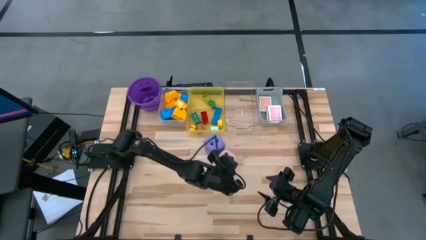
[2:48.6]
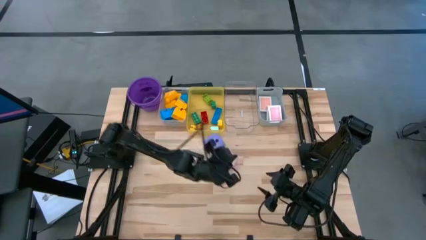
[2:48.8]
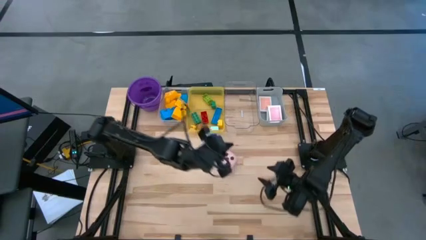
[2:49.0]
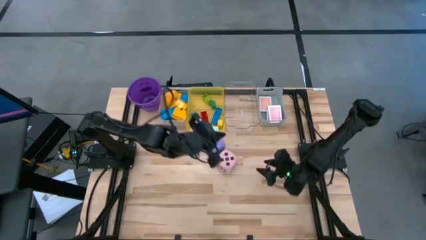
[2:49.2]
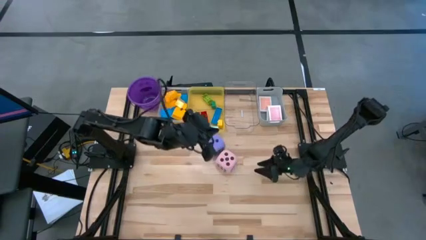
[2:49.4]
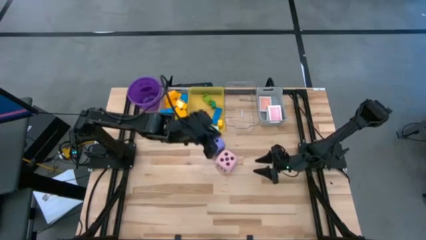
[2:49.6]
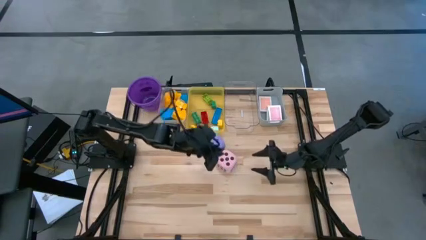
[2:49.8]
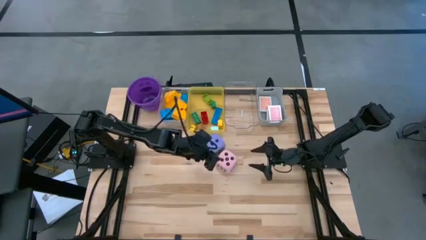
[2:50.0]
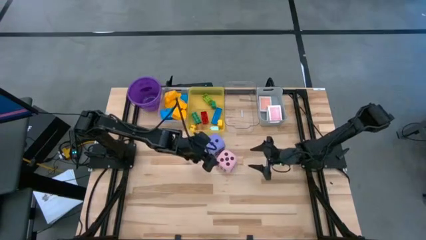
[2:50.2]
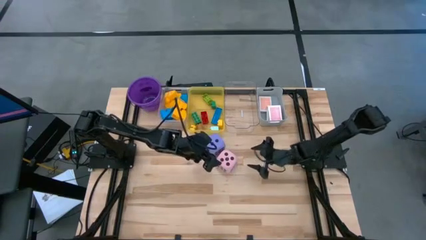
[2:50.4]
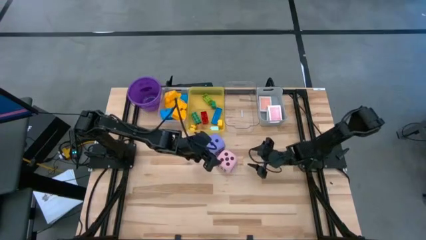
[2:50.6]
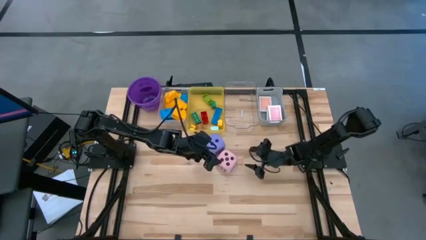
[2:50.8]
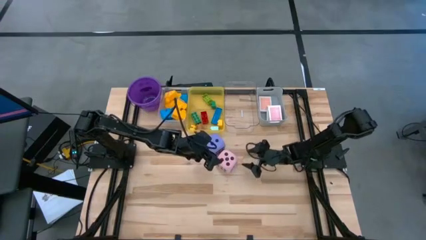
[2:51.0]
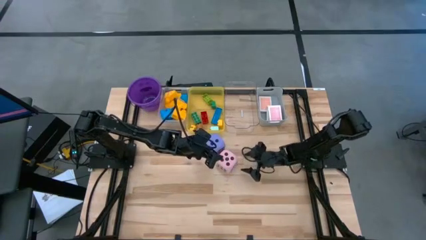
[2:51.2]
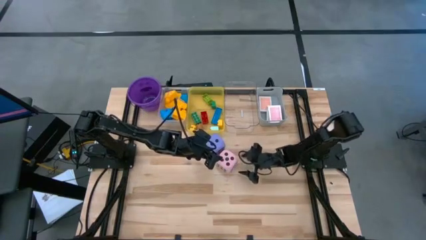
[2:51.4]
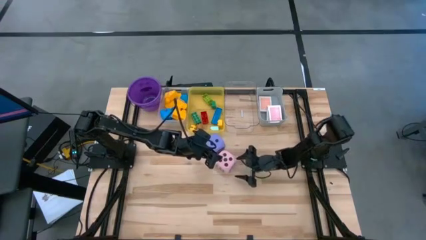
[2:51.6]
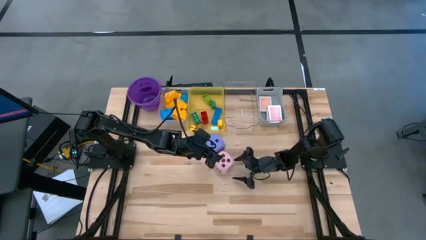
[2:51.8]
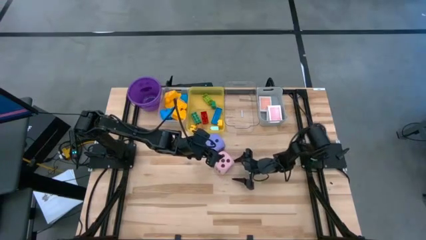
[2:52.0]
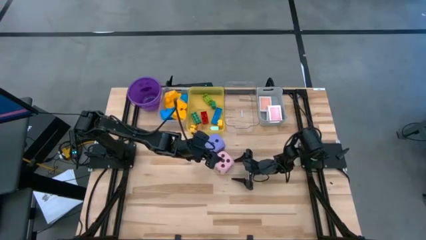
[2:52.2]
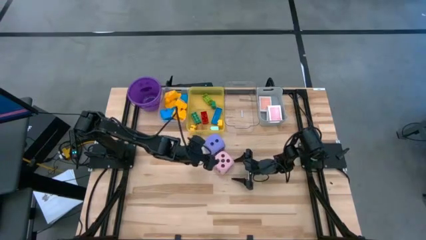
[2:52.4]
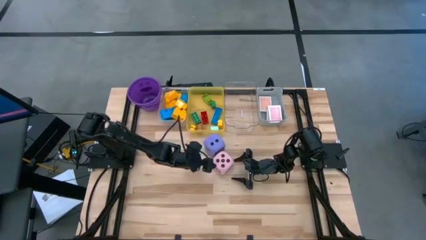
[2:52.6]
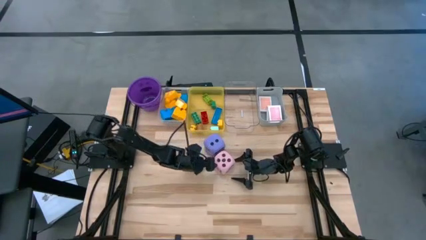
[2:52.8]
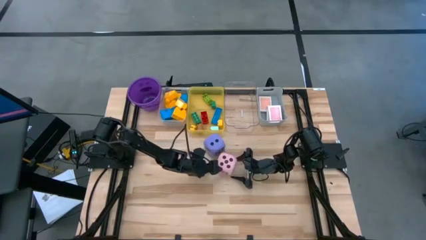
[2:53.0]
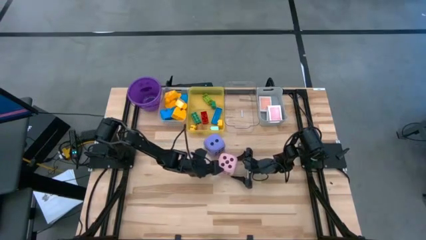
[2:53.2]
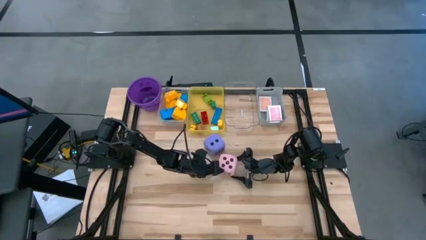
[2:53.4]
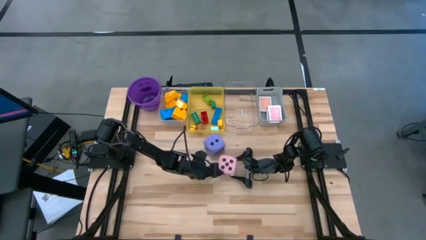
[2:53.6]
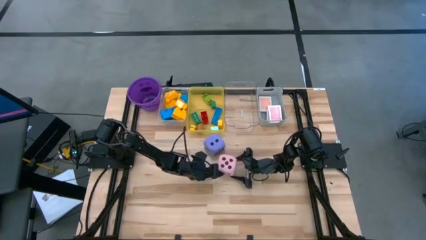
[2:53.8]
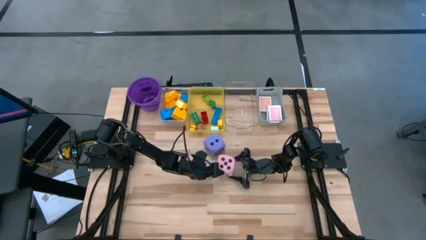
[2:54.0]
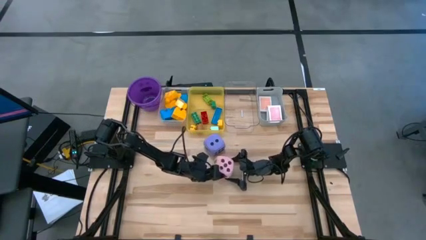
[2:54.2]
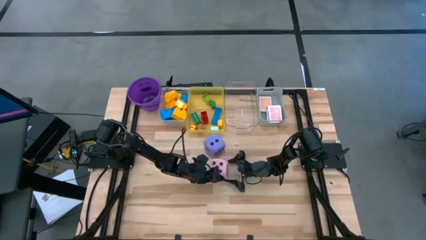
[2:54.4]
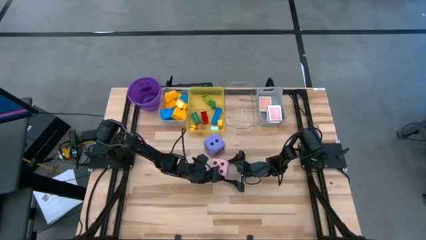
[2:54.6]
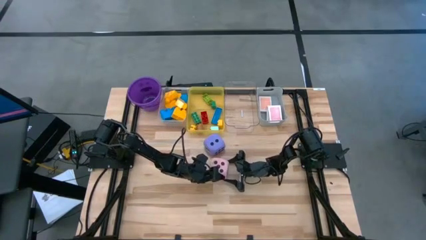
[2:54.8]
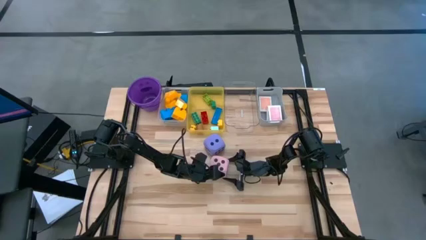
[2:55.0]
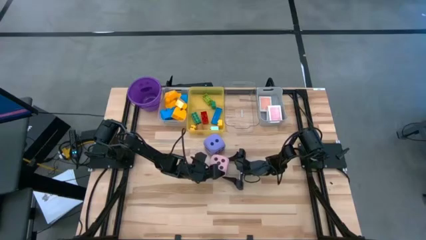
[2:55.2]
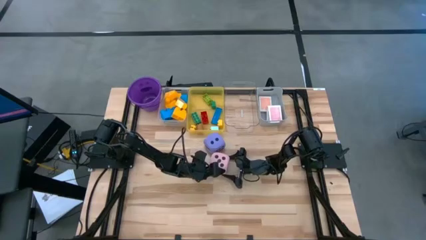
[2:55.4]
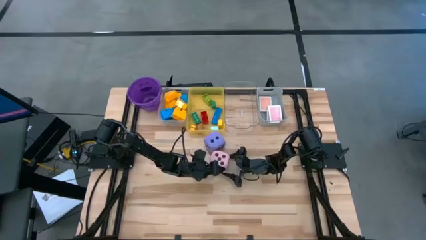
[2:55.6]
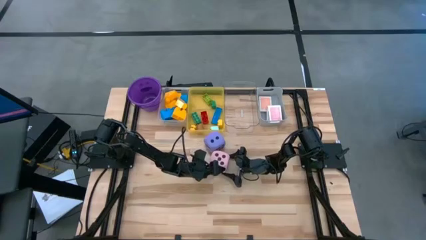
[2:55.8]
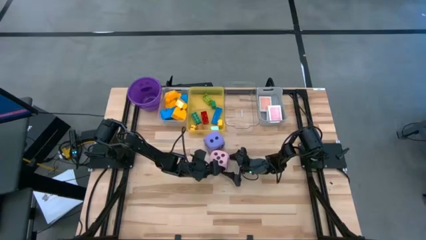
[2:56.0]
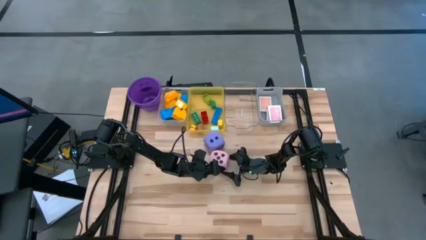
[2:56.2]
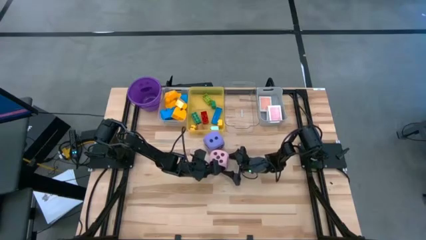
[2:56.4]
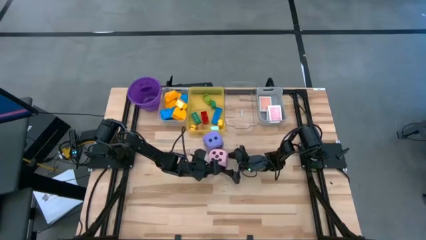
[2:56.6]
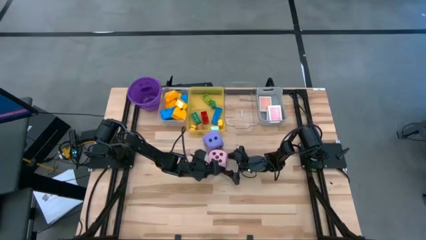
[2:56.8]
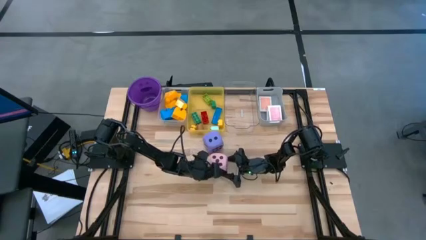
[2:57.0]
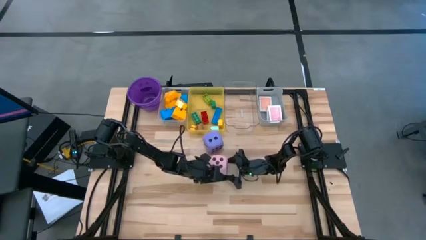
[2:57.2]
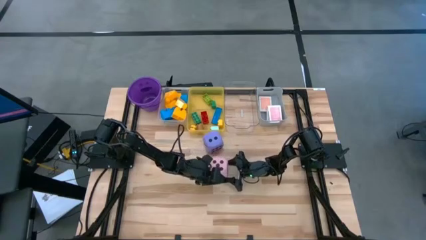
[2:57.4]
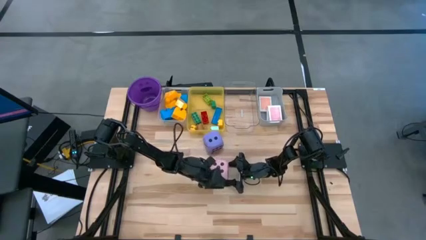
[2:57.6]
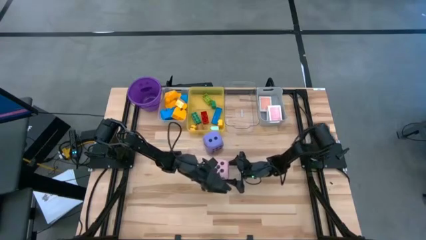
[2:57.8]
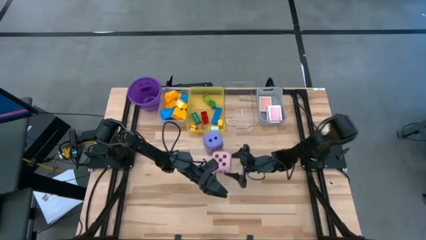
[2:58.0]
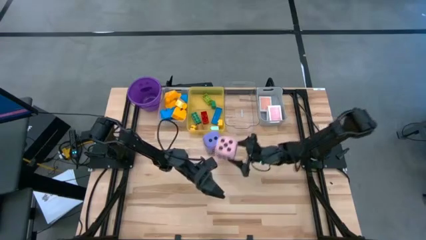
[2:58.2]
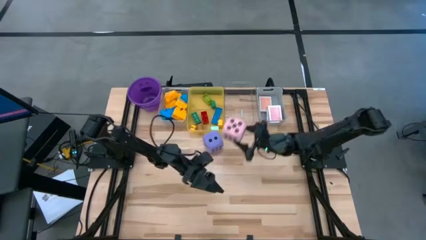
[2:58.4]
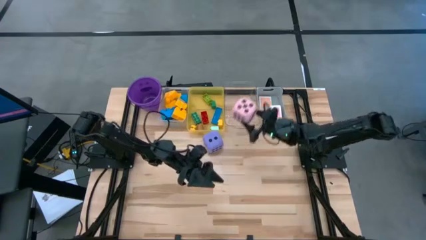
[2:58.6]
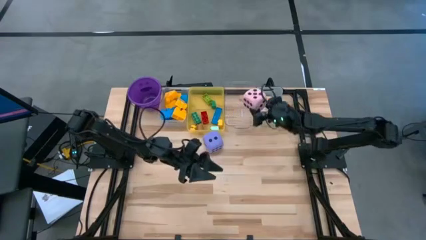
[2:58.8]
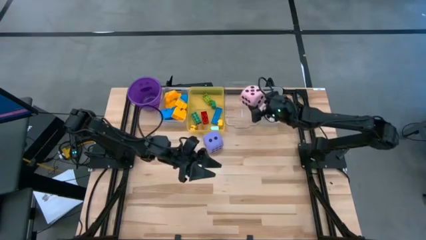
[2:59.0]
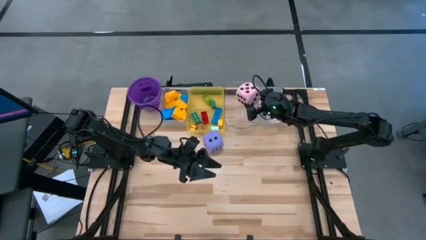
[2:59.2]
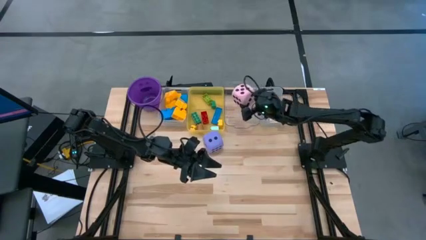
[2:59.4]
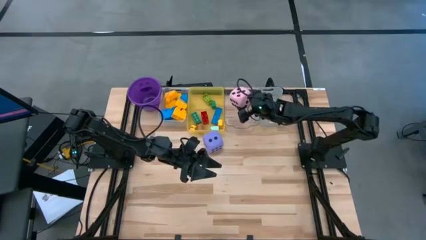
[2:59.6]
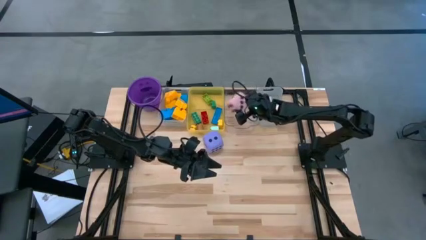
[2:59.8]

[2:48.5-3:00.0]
Task: Pick & Place Toys
Put the pink dice into the right transparent bin

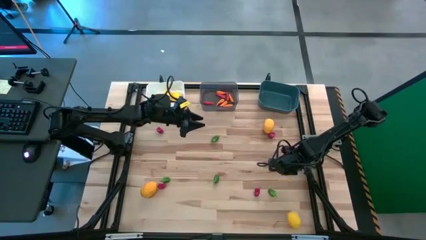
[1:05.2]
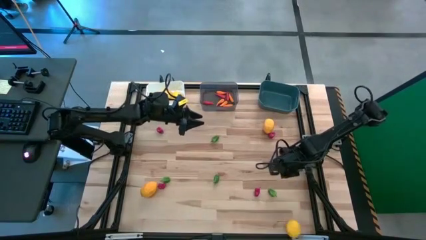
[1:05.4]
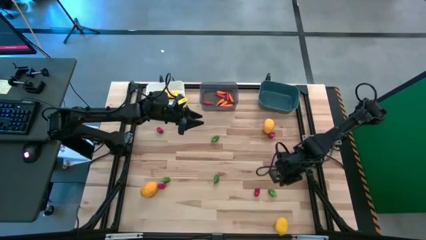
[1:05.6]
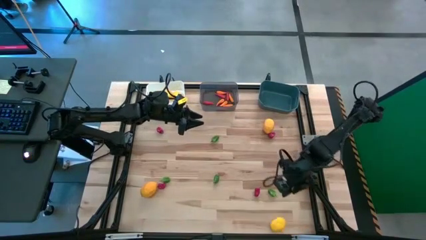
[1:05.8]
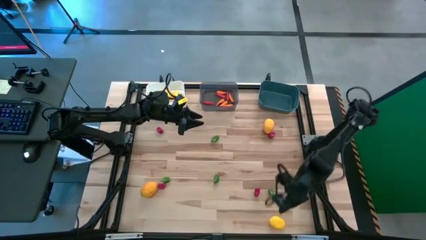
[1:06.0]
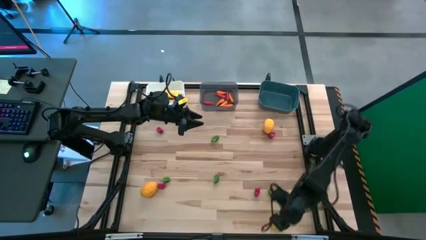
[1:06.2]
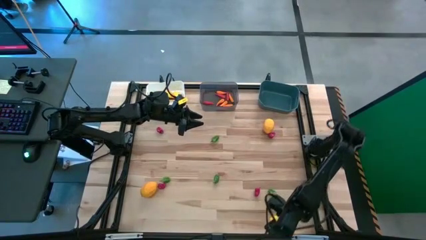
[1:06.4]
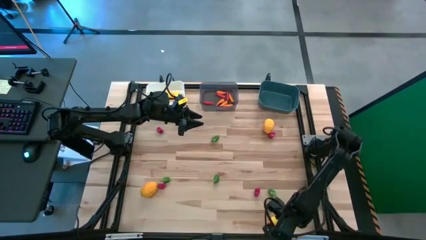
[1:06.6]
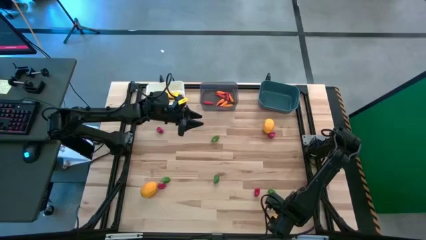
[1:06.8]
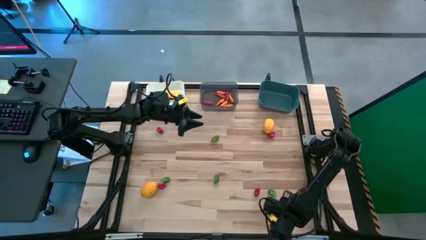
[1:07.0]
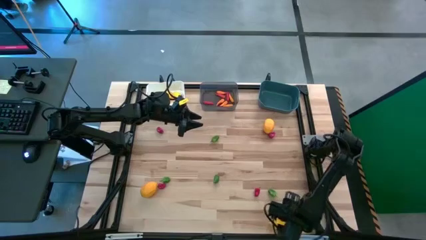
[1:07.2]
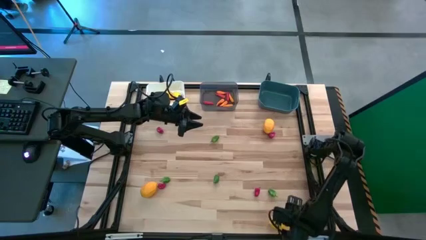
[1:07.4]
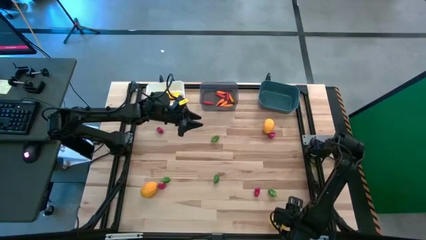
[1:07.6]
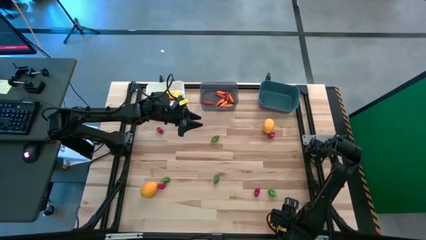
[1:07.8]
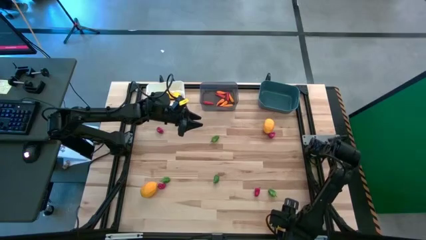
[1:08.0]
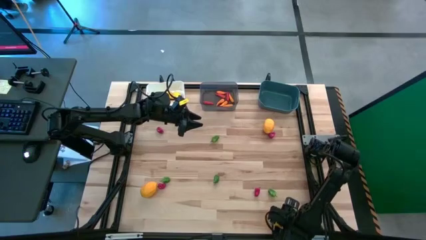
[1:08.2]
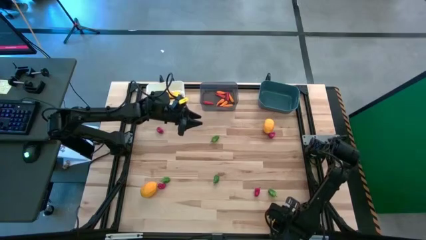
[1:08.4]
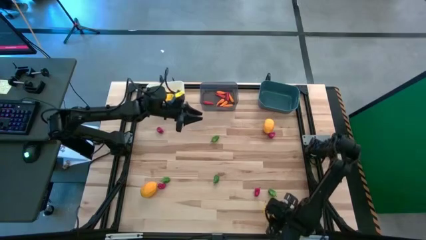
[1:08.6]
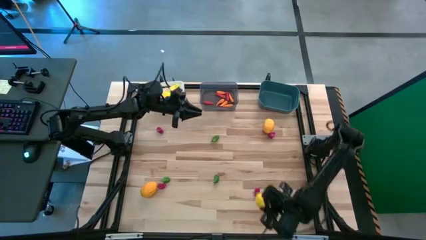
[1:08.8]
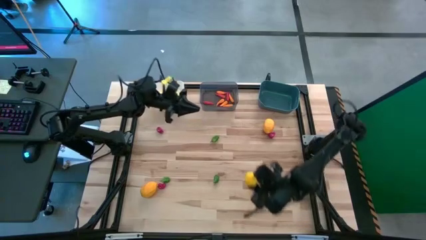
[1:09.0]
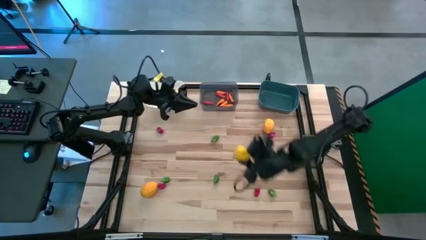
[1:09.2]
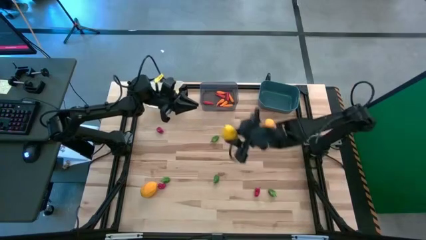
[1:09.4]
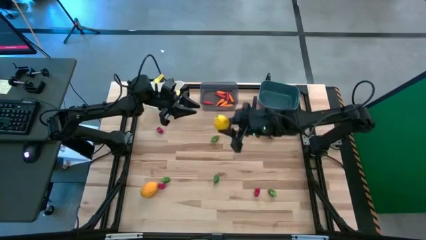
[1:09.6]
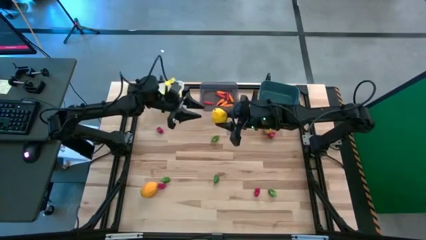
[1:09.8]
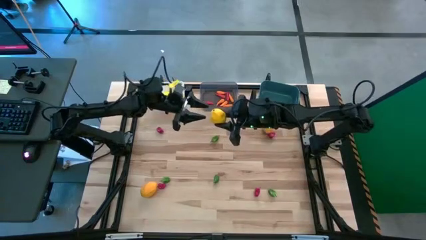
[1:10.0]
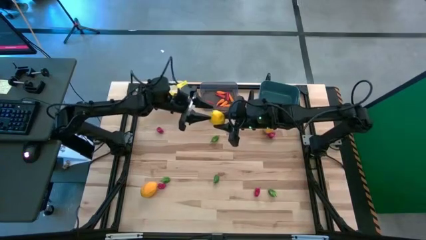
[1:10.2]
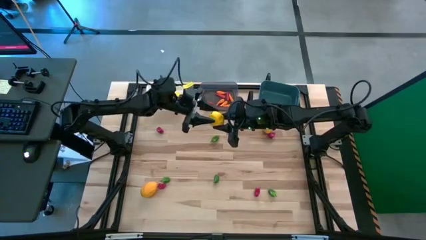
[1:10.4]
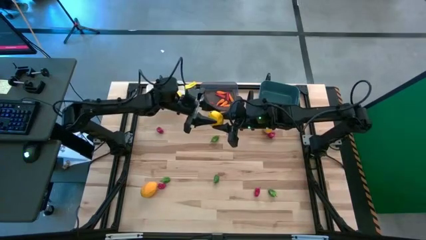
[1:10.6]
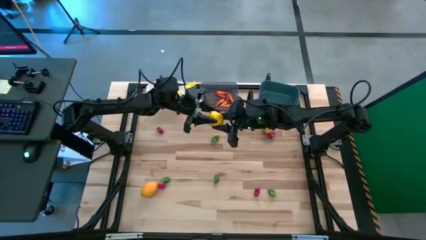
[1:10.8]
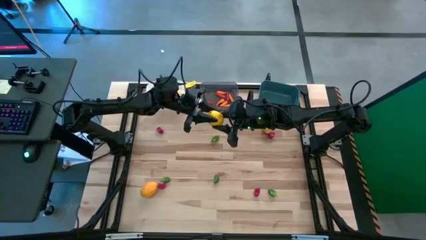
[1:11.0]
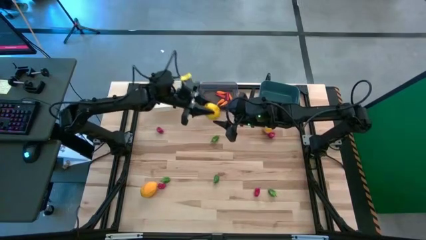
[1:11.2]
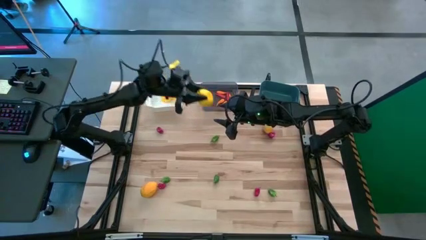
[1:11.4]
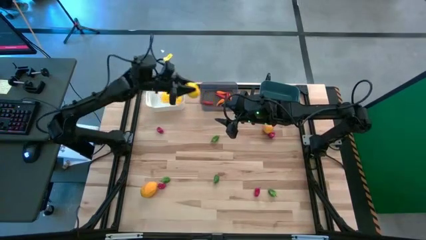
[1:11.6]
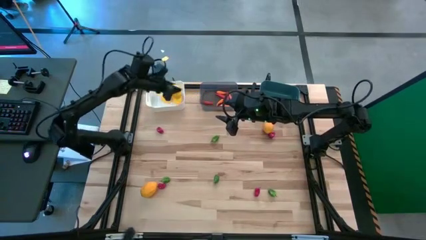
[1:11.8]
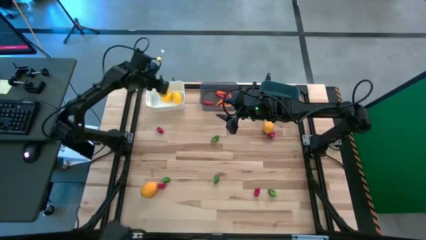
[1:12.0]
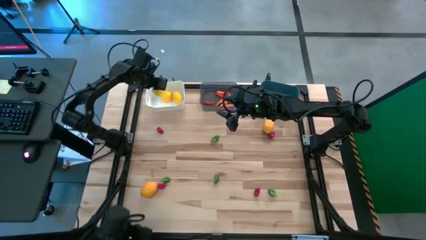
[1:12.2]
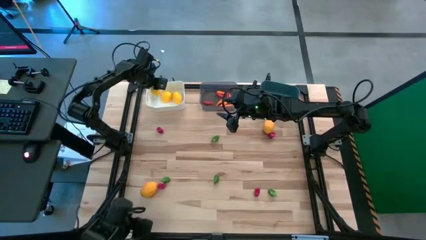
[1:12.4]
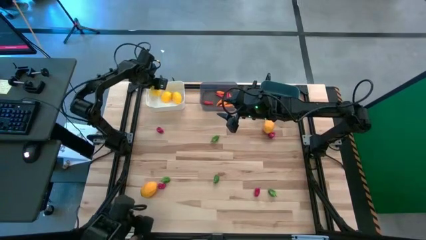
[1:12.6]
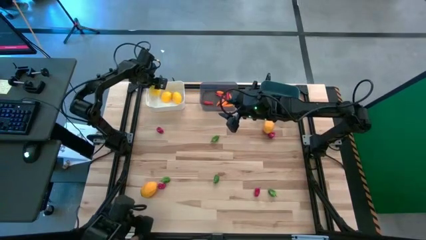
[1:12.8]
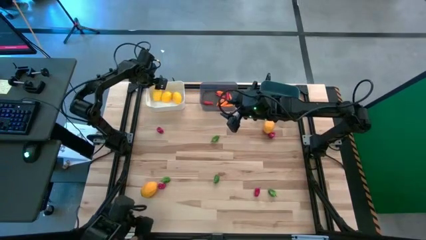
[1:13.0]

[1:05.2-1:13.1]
Task: Sort produce into baskets
Put the bottom right yellow lemon into the white bin
